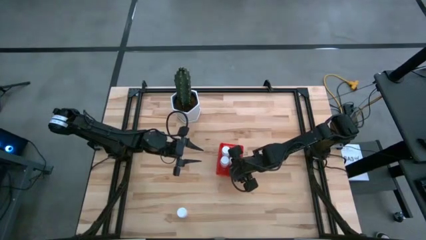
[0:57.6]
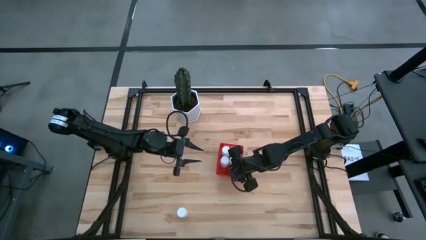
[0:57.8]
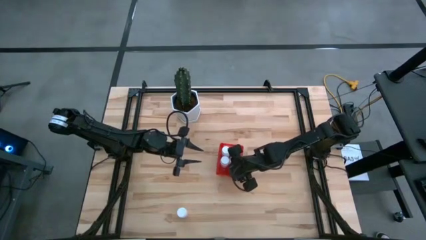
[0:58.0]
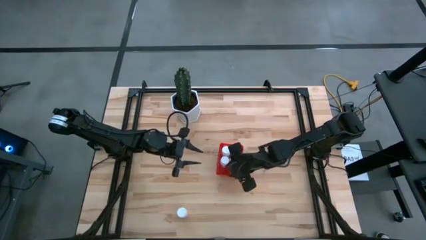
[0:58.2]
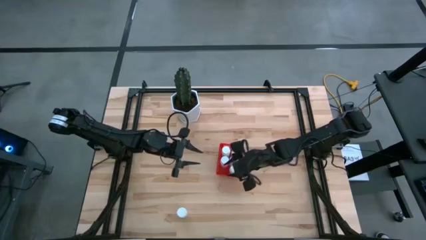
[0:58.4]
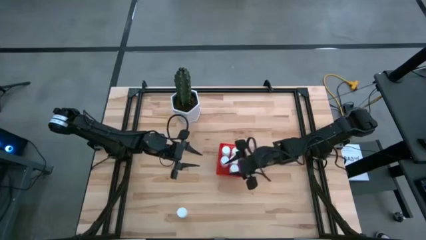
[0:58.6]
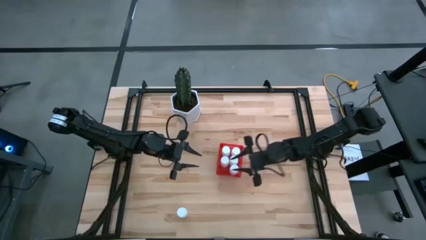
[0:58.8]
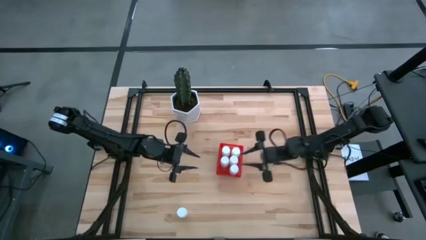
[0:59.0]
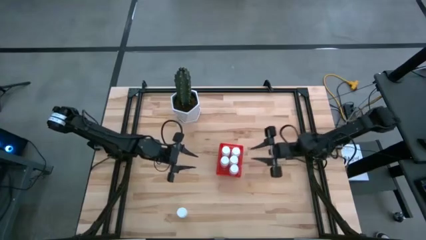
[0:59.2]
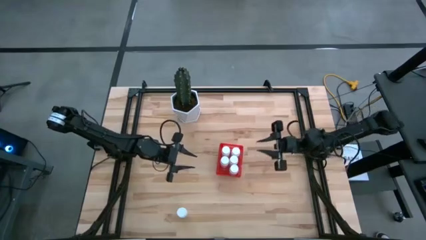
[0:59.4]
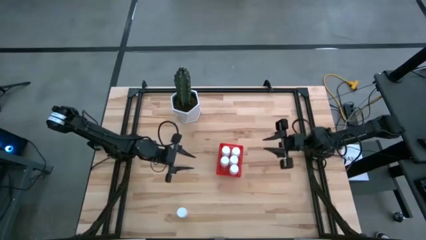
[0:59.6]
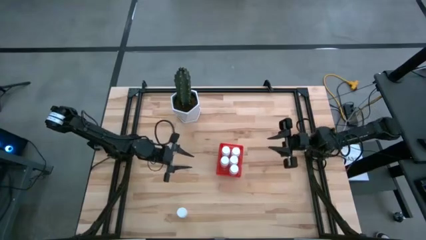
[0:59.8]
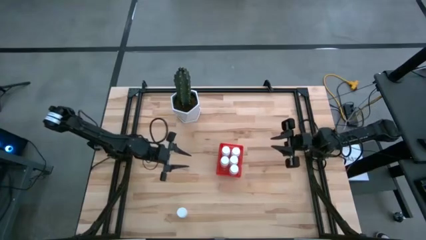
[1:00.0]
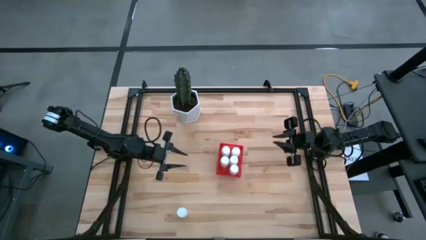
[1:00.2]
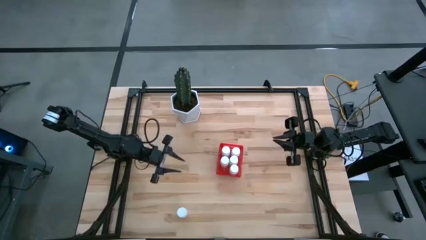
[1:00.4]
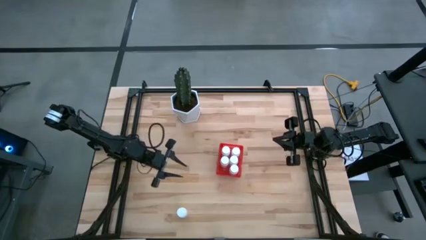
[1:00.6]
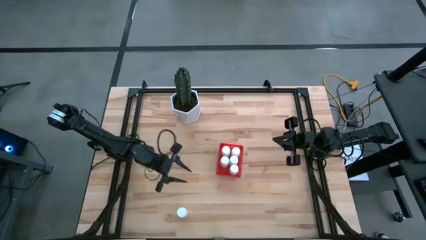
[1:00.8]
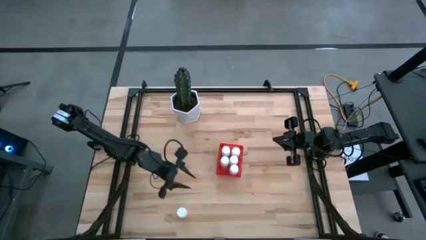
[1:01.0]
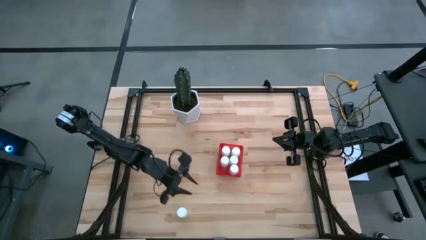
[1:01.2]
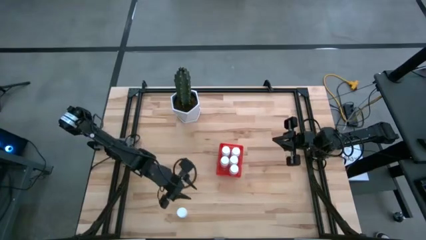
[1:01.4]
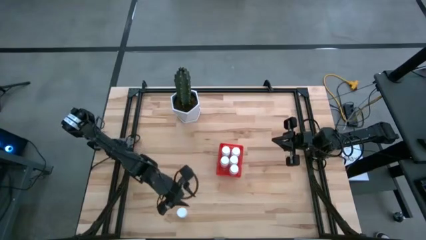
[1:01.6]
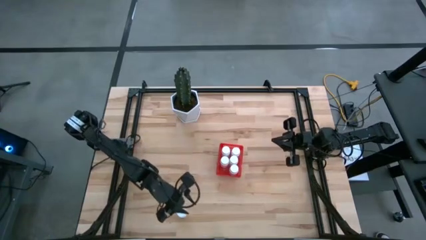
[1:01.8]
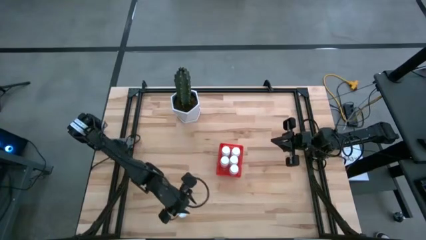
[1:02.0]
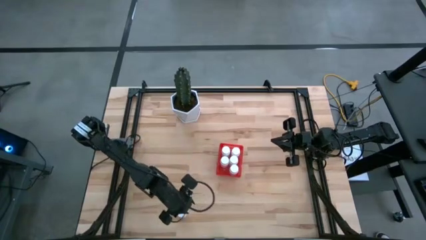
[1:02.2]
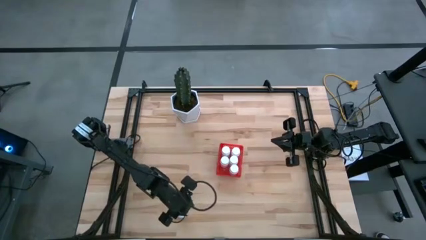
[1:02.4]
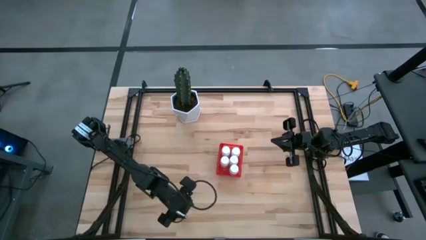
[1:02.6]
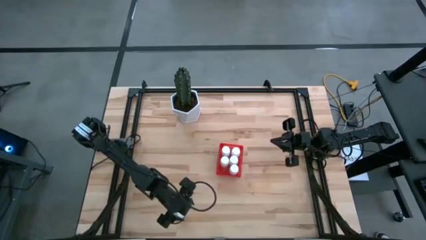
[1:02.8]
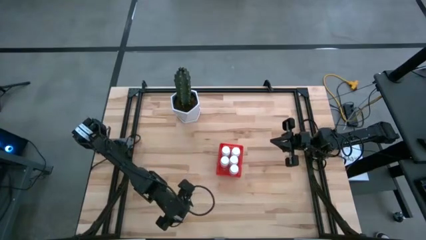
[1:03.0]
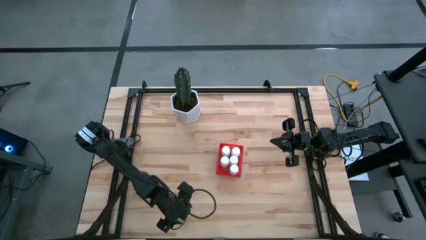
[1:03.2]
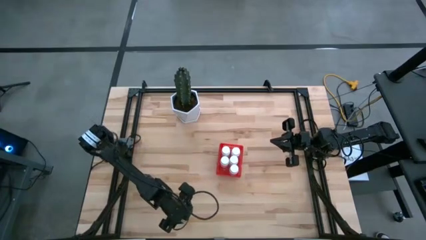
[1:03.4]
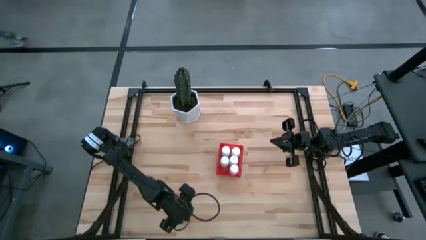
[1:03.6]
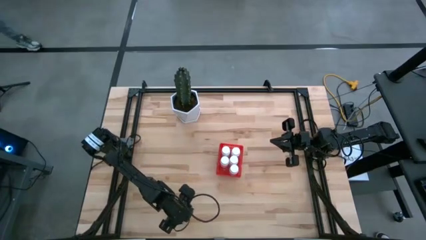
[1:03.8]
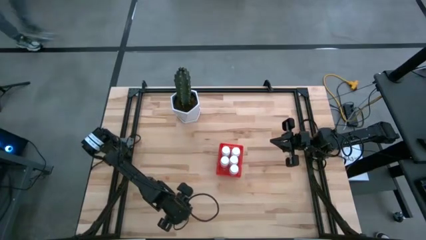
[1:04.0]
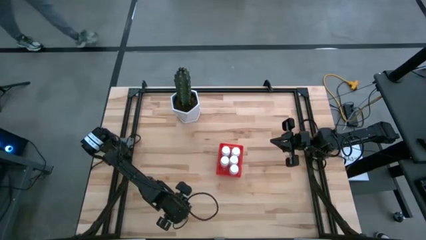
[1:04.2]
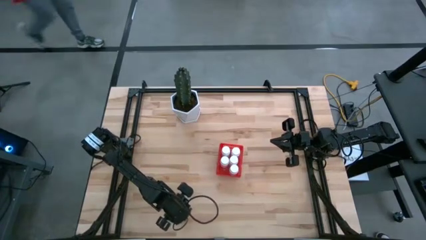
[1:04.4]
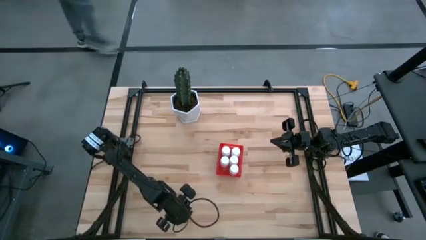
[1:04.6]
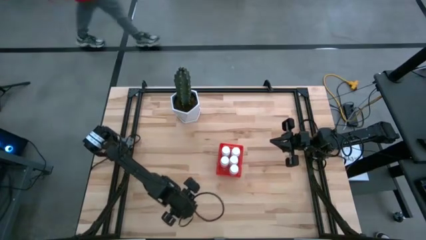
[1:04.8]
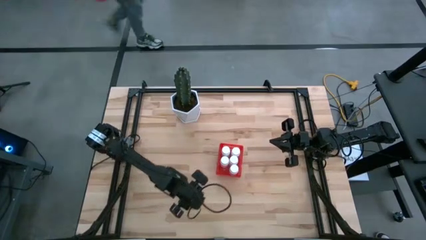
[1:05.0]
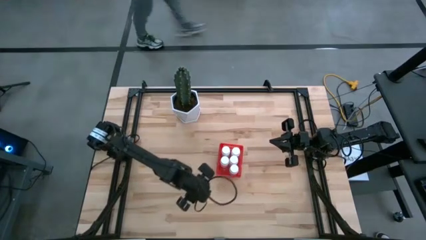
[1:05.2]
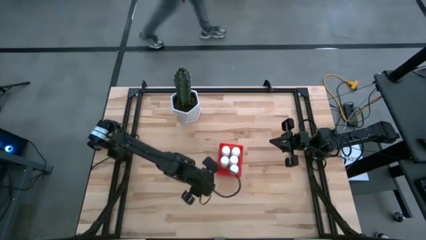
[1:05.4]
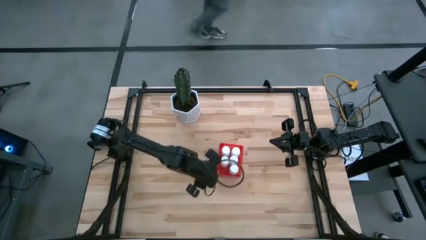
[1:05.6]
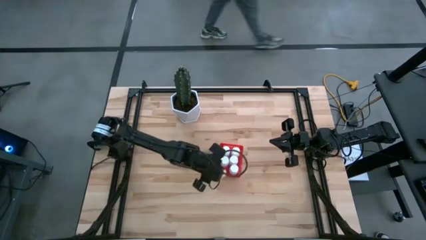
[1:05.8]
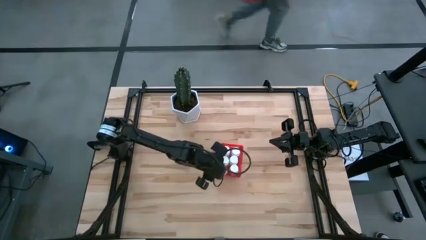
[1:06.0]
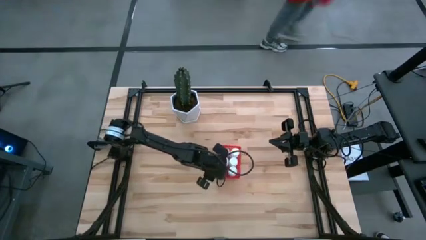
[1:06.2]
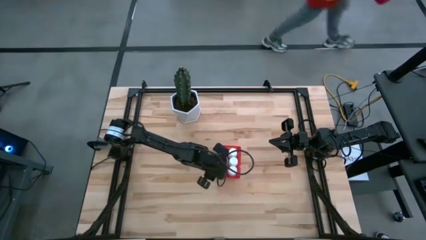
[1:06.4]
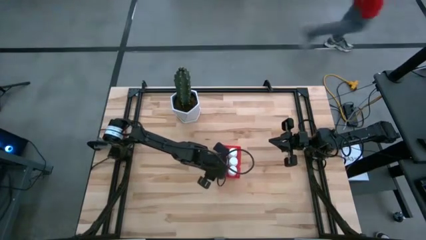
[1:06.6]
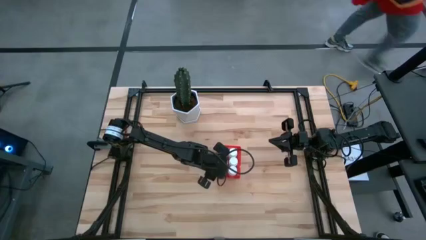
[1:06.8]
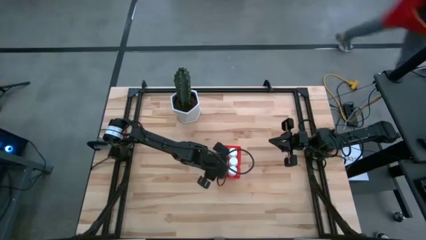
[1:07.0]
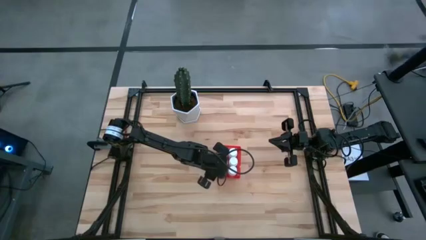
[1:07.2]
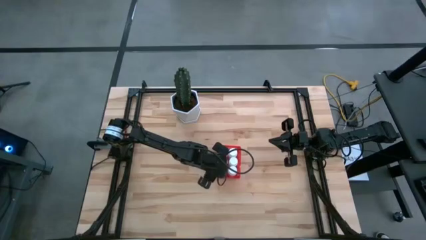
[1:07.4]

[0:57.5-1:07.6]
Task: Pick and place pill bottles into a basket
Put the white pill bottle into the red bin

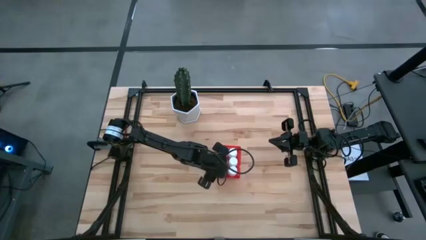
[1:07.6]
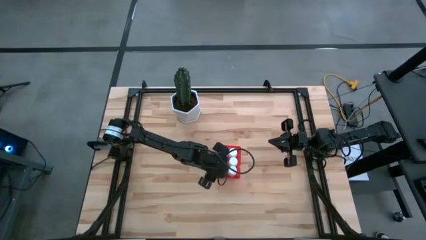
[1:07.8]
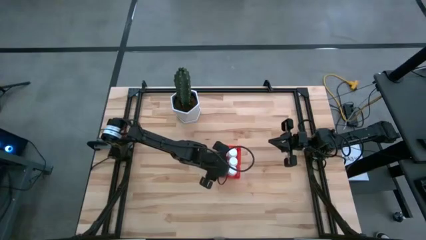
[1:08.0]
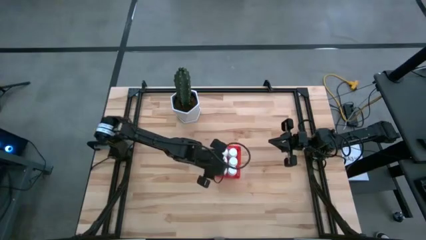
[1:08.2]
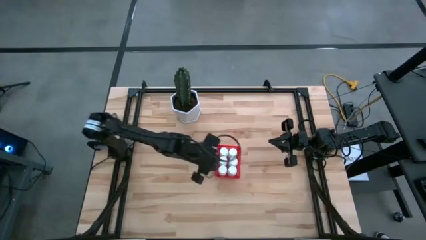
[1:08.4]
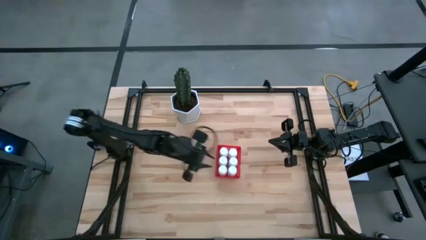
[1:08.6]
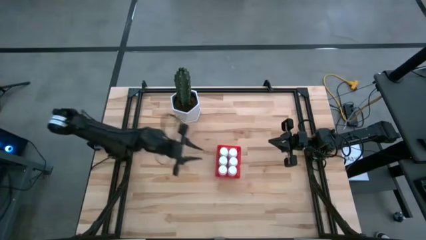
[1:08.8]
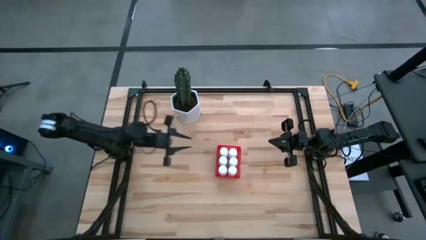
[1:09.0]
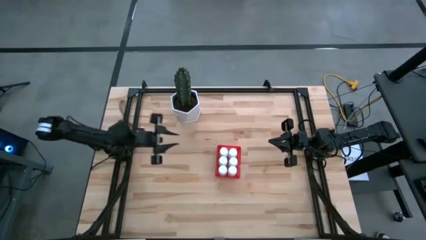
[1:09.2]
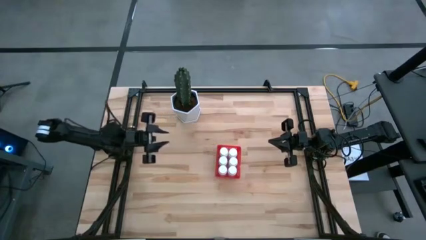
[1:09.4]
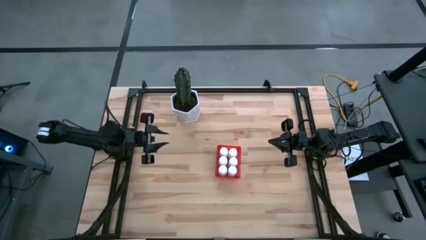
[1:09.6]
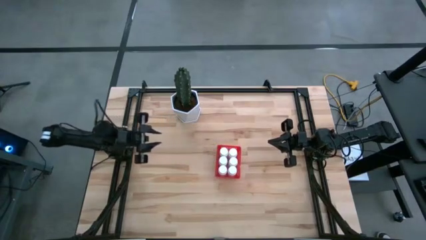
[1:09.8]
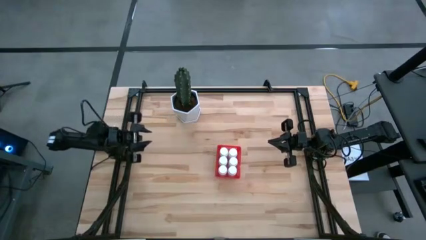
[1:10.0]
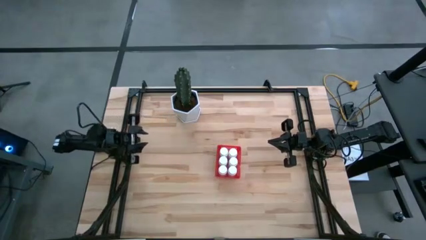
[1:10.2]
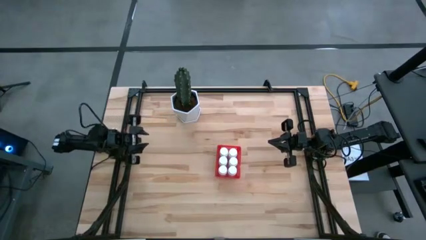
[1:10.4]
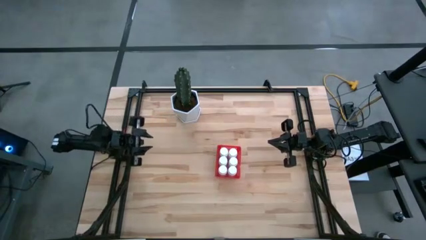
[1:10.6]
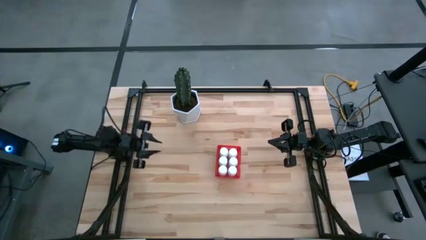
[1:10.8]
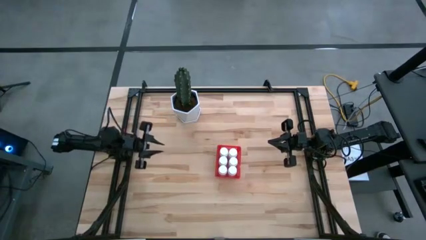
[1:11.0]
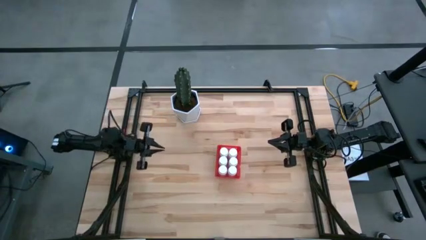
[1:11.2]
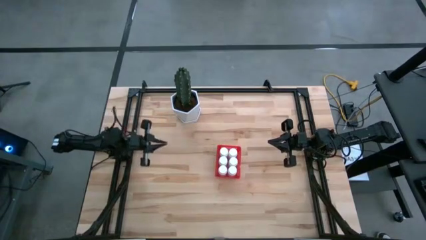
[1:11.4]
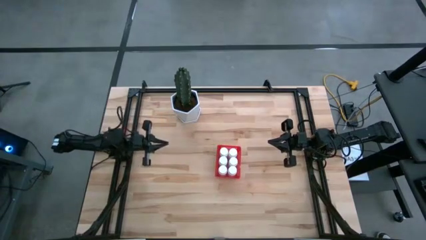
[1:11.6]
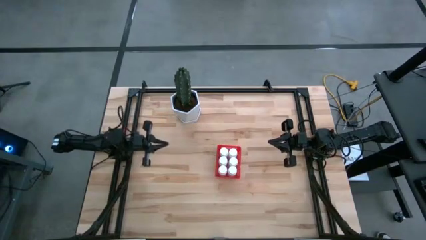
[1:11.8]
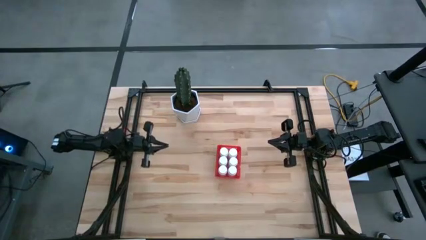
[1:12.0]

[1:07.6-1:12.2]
Return to Home Position
